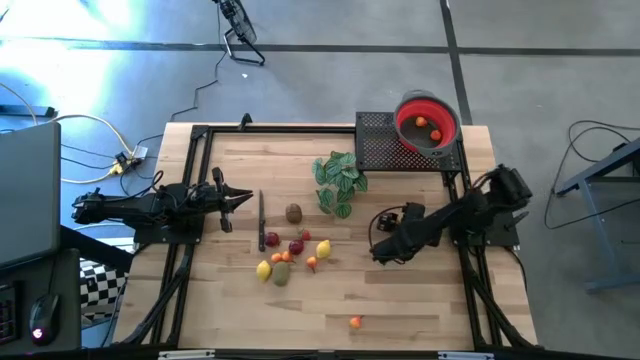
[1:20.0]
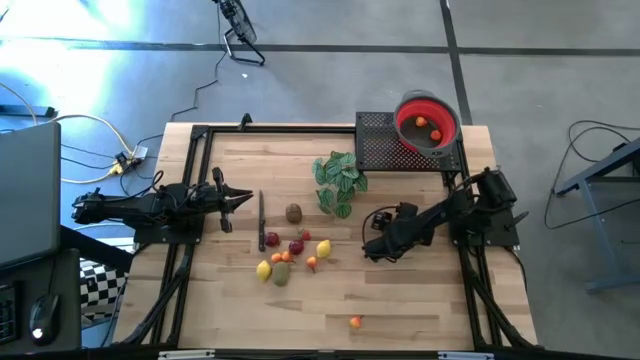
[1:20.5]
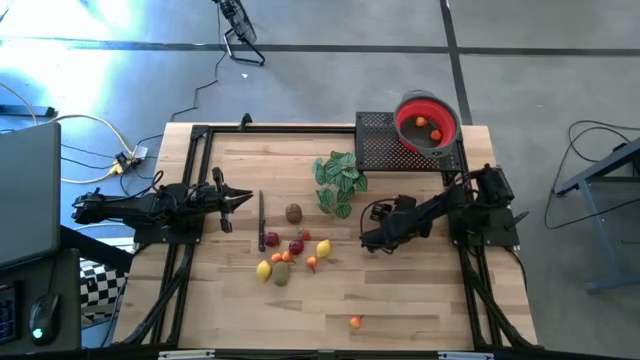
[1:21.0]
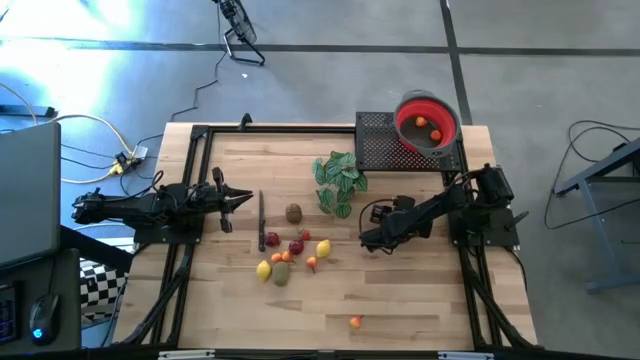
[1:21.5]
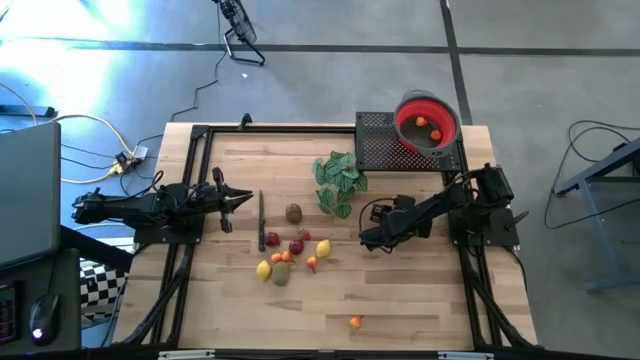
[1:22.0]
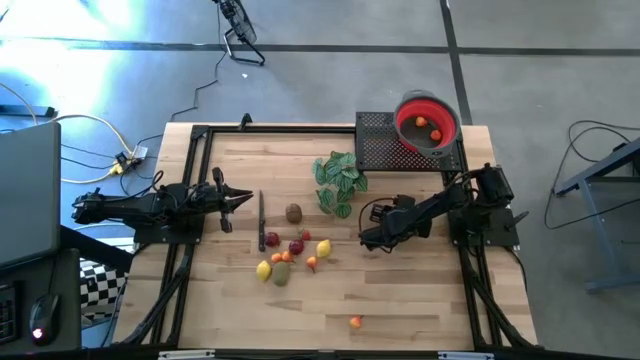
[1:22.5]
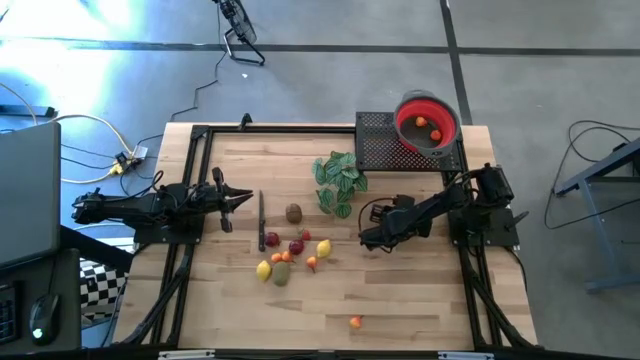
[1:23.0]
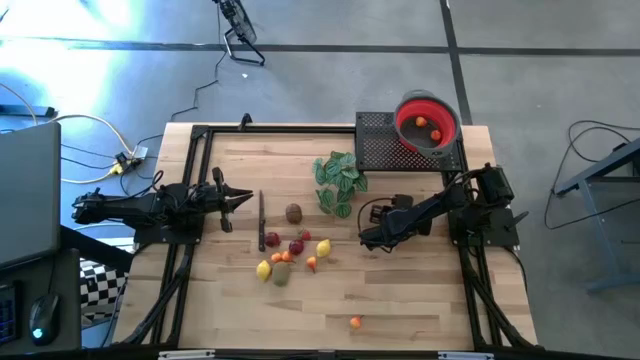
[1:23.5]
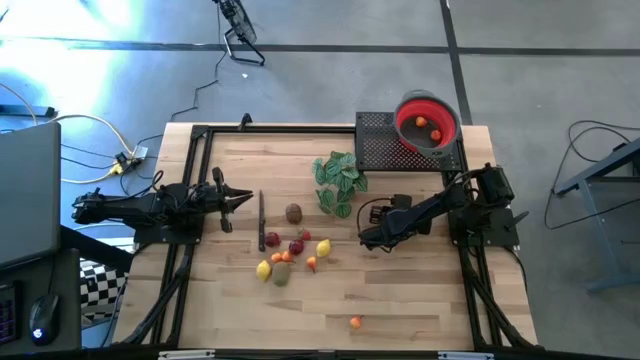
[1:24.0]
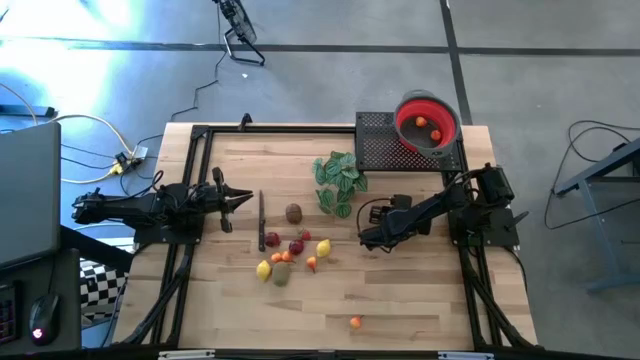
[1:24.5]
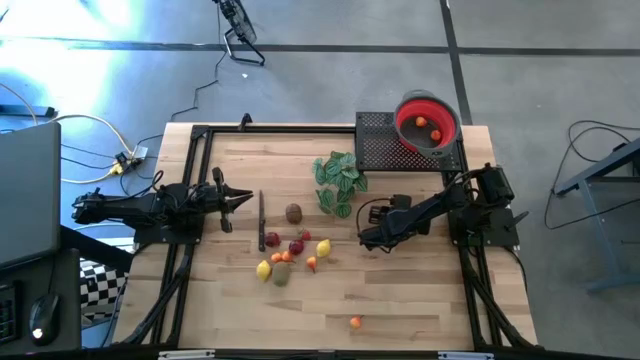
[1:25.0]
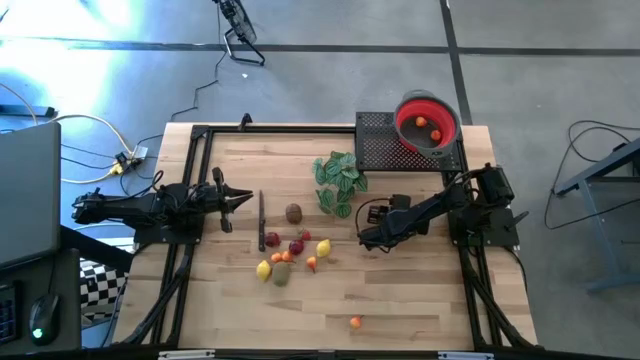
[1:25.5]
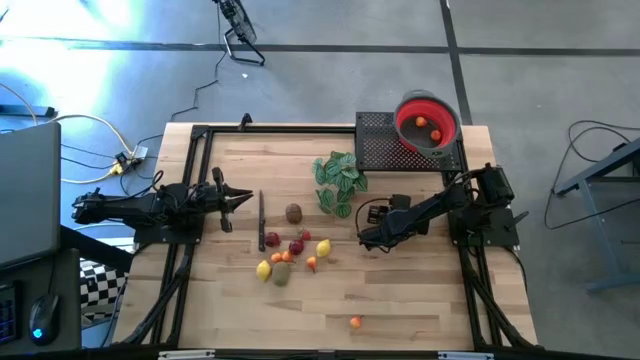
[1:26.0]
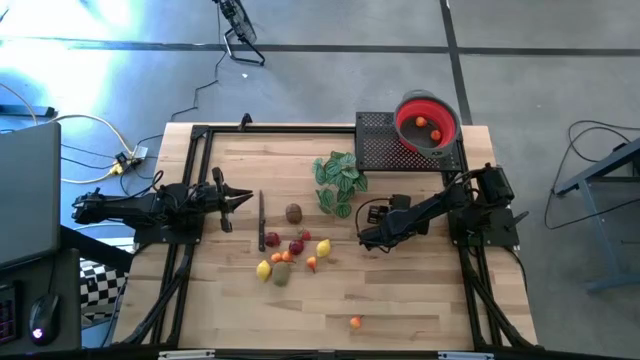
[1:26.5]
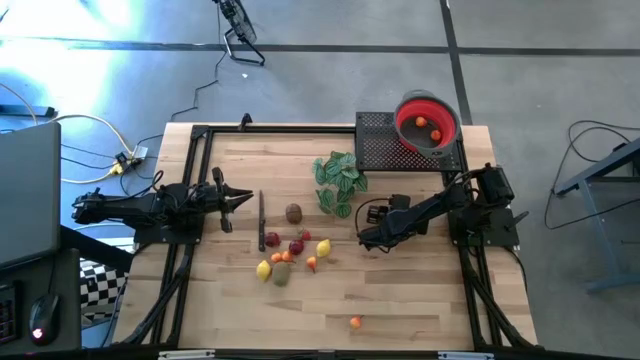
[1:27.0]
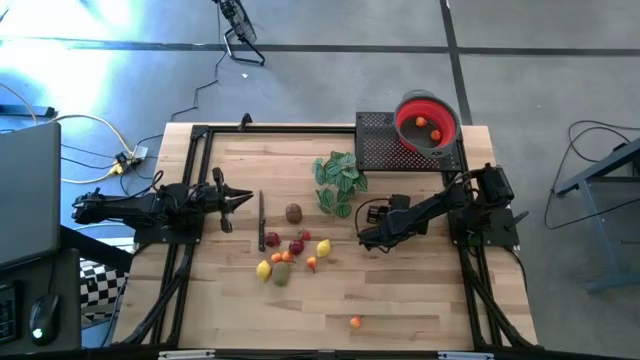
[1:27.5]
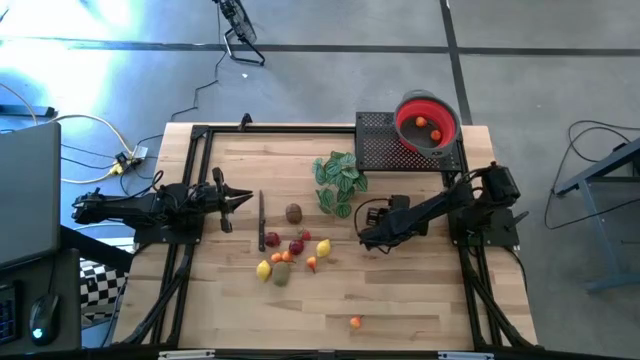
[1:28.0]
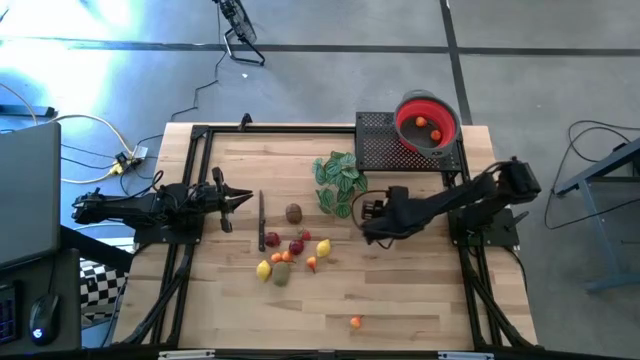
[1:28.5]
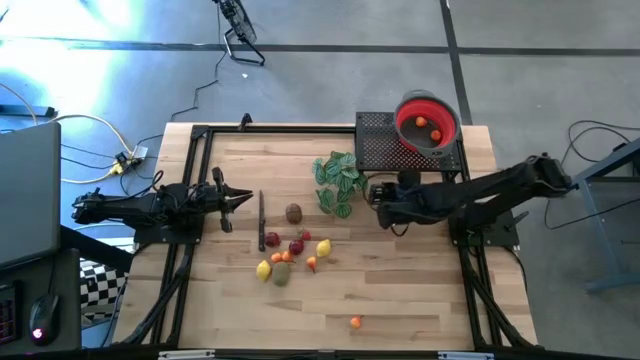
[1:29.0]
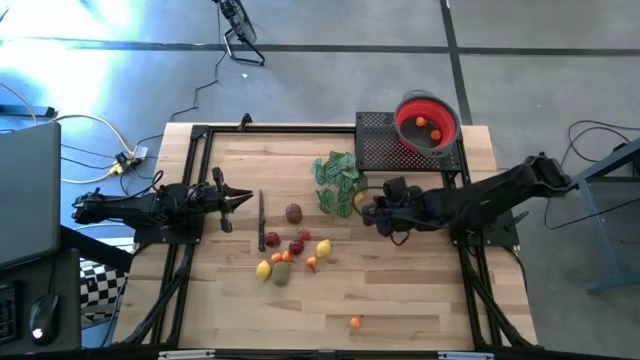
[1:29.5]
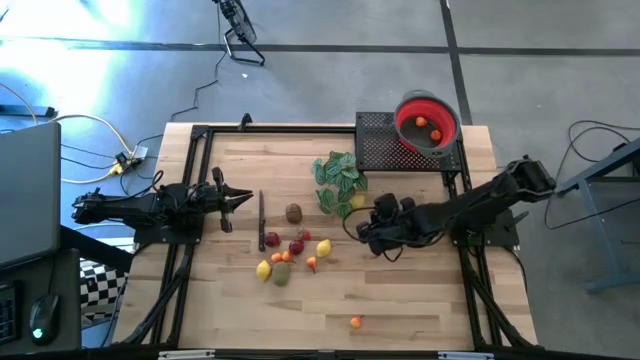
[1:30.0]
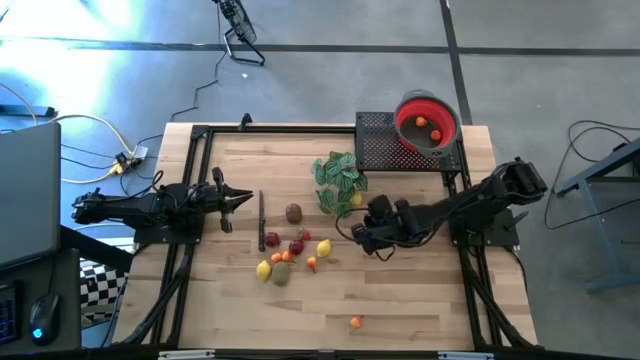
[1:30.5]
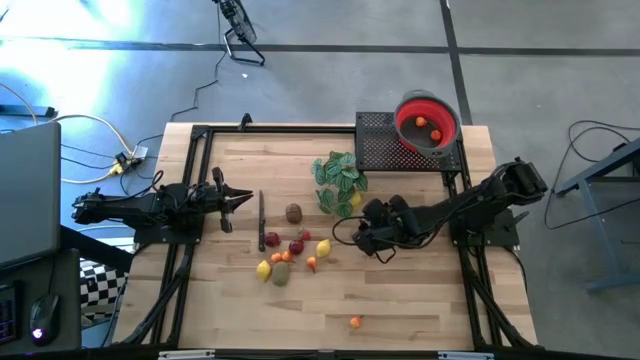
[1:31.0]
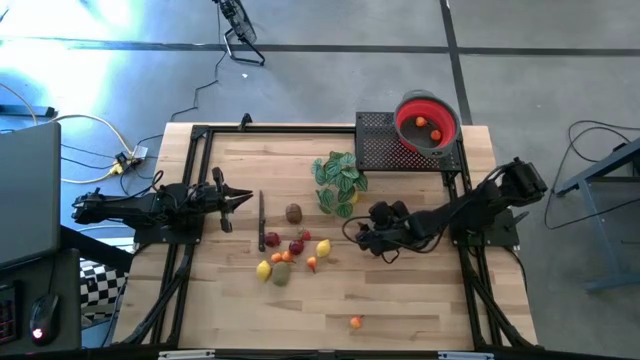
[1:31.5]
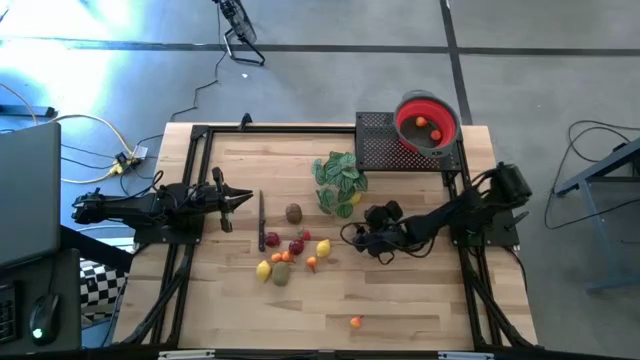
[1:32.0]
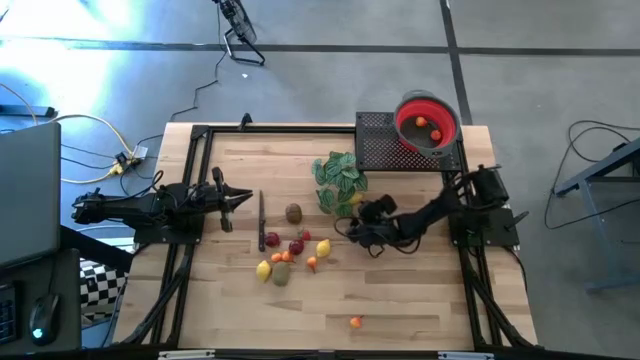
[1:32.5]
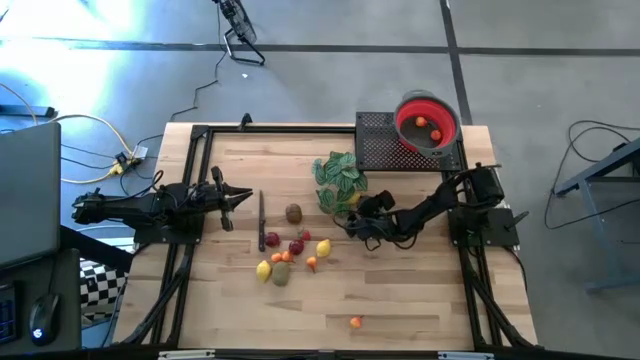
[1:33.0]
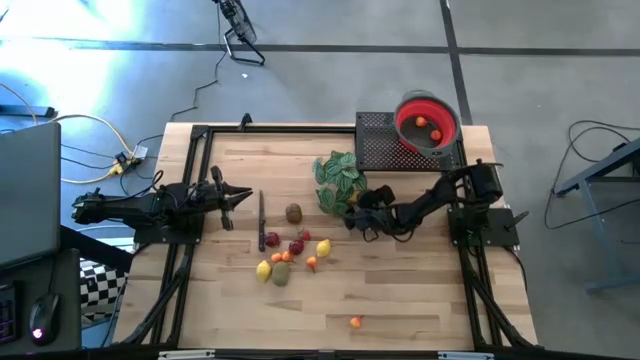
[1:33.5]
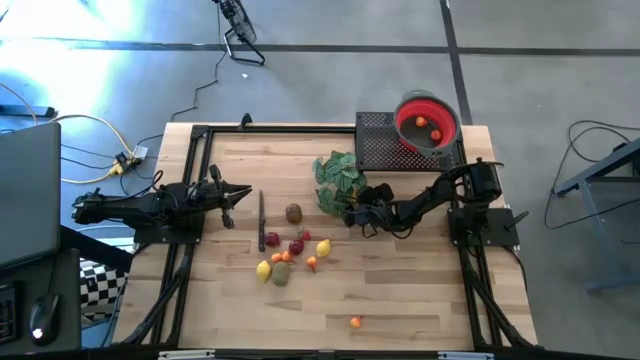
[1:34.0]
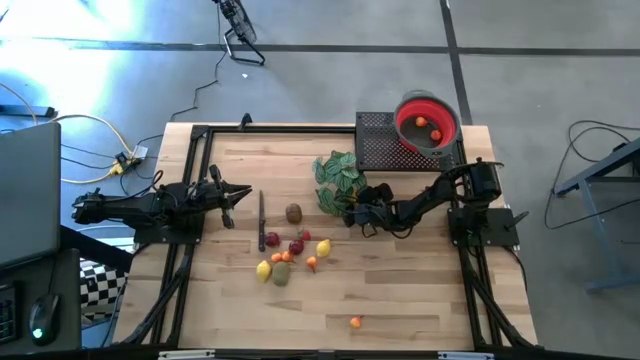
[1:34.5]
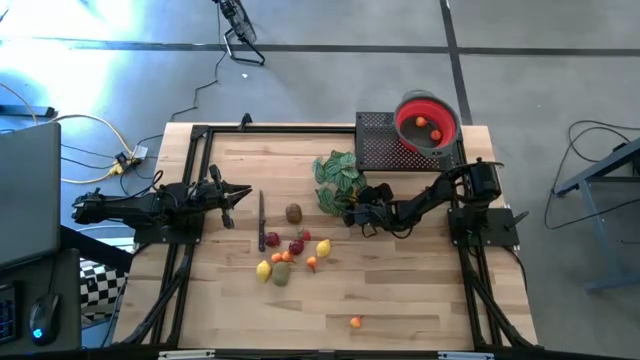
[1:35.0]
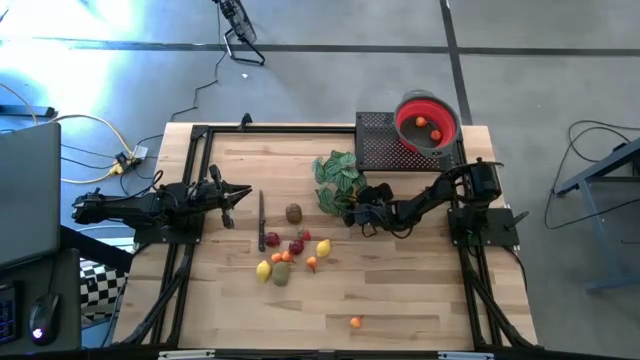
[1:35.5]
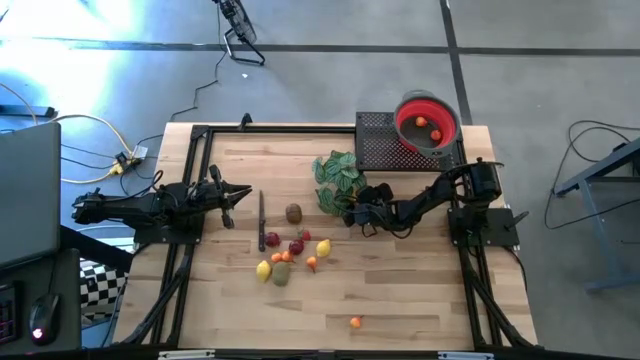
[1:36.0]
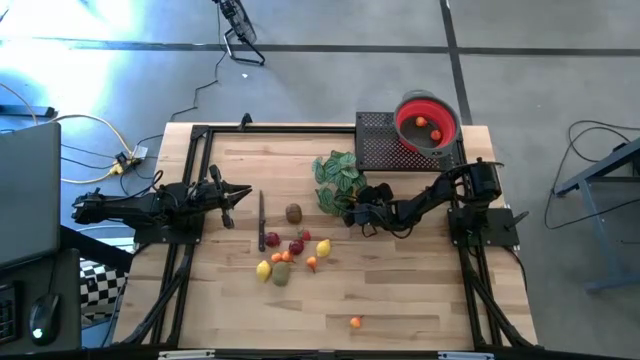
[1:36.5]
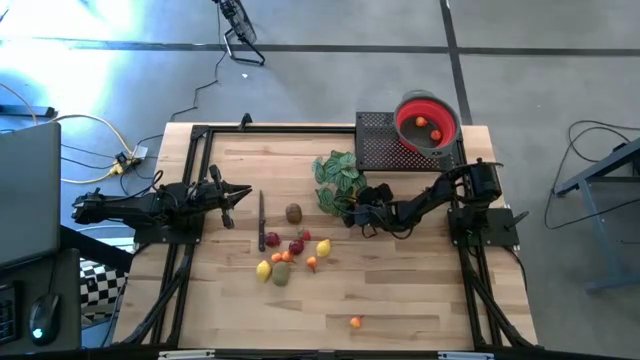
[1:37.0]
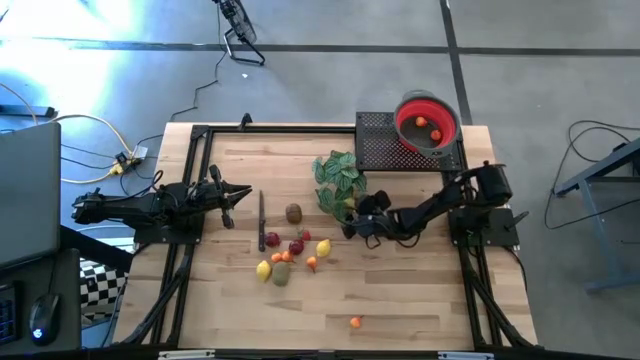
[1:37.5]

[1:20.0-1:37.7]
Task: Pick & Place Fruit
Put the lemon into the red colander

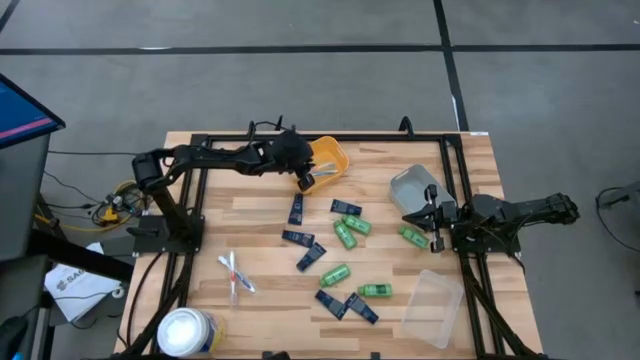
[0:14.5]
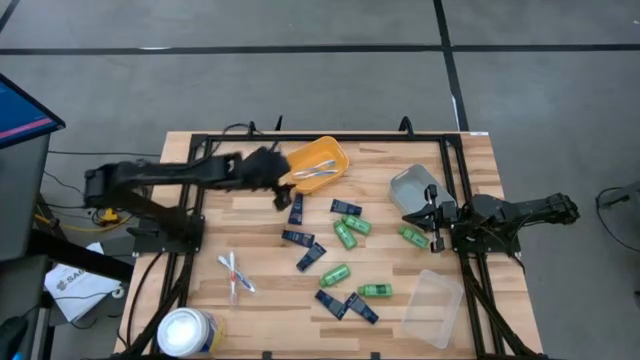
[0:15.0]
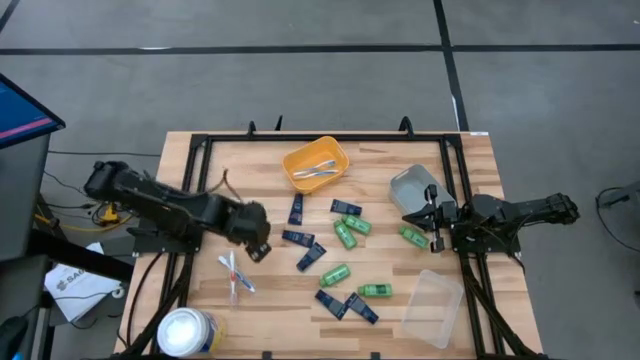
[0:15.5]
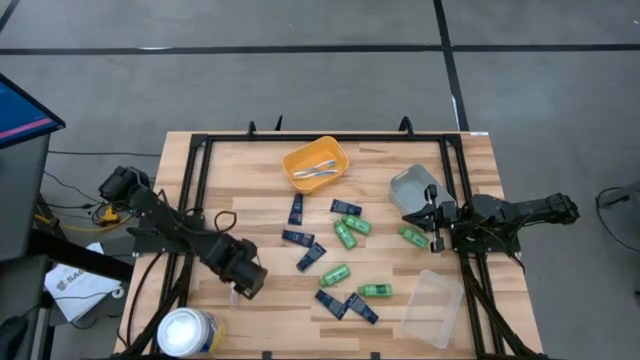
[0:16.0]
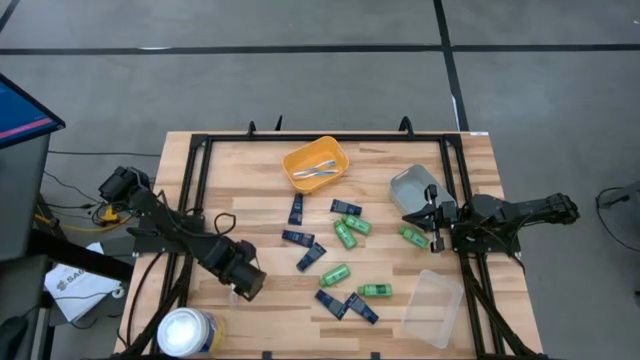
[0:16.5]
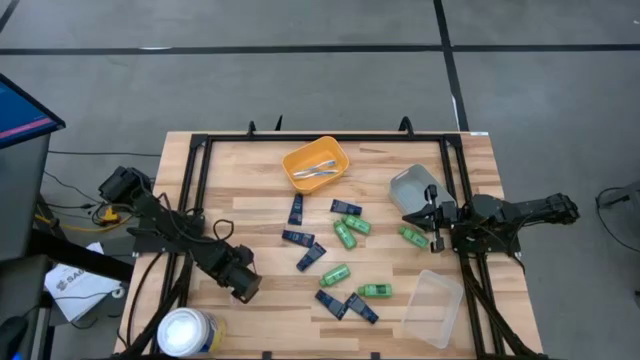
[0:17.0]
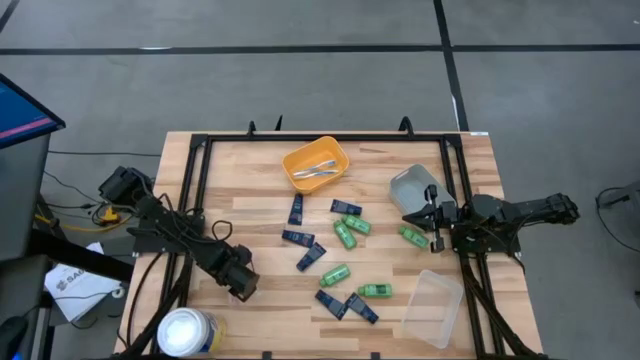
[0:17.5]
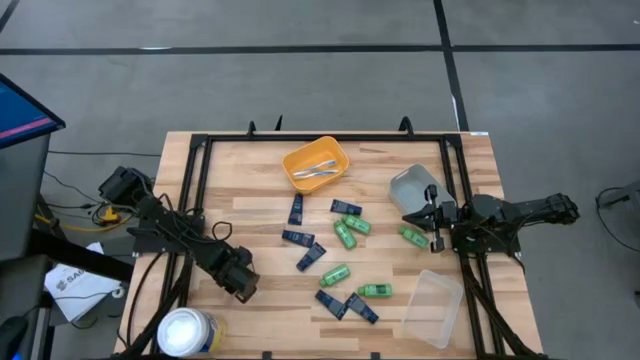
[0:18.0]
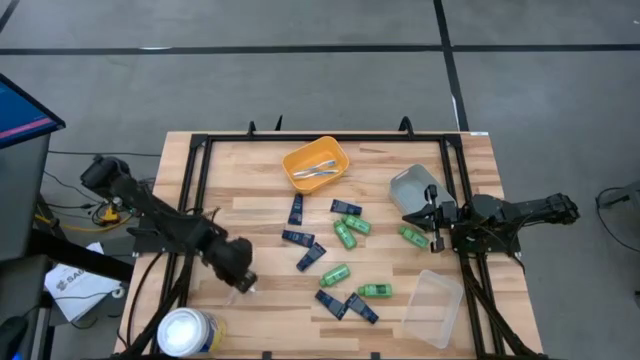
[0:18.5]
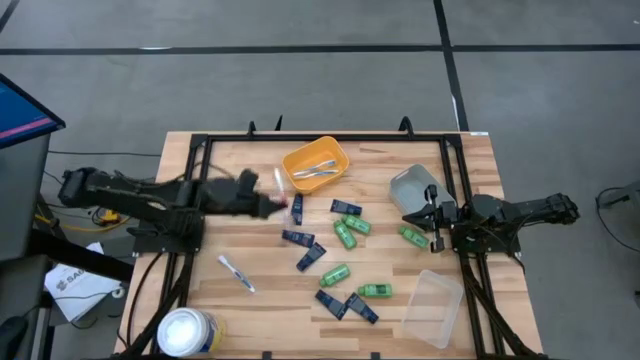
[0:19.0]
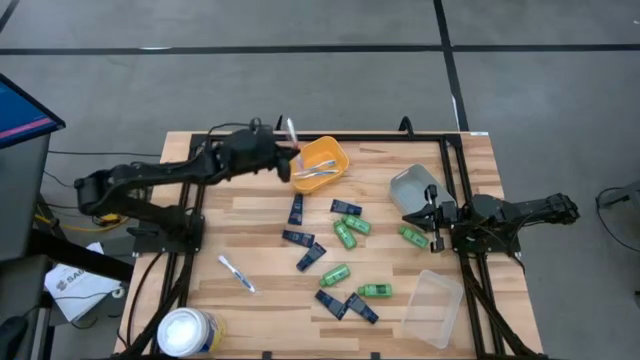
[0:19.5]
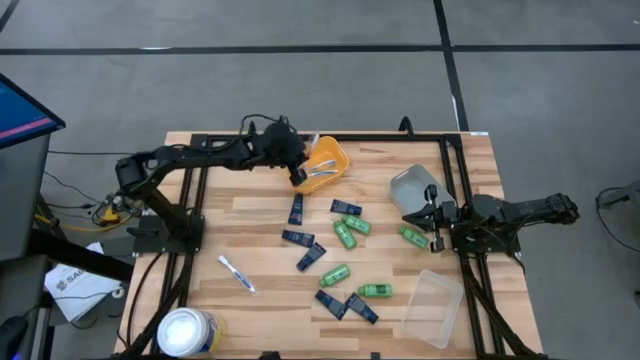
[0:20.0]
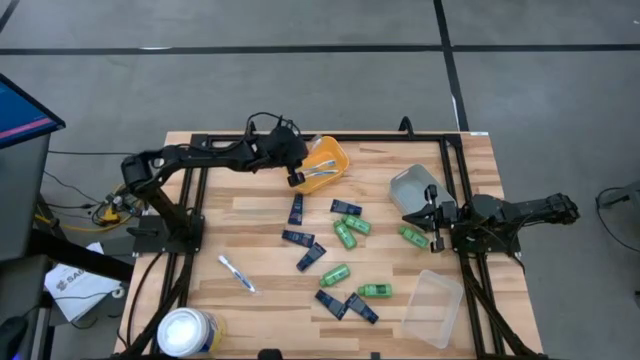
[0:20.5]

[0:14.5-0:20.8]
Task: Pick & Place Travel size toiletries
Put the red toothbrush into the yellow bin
